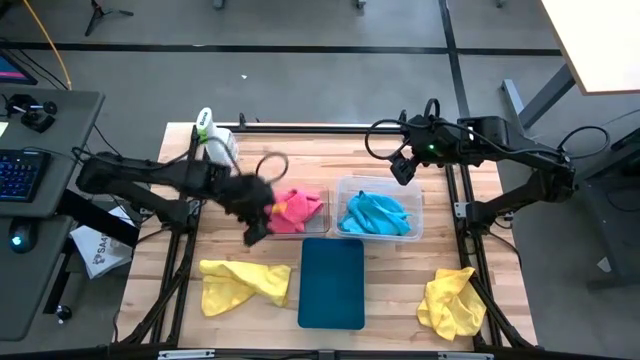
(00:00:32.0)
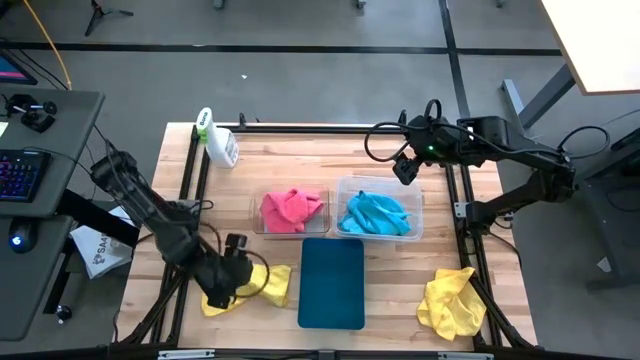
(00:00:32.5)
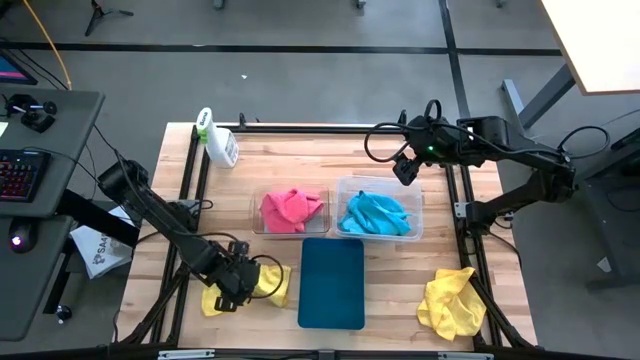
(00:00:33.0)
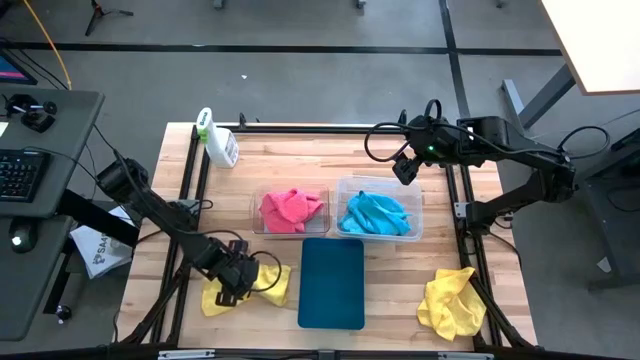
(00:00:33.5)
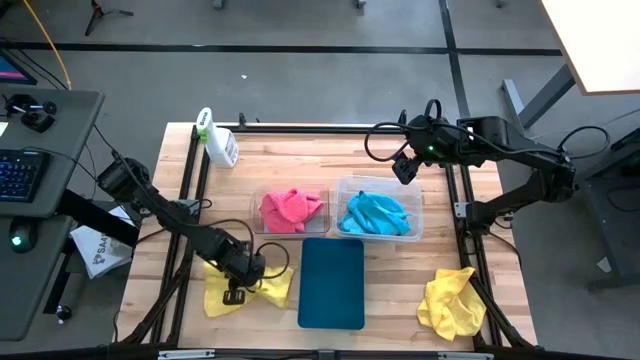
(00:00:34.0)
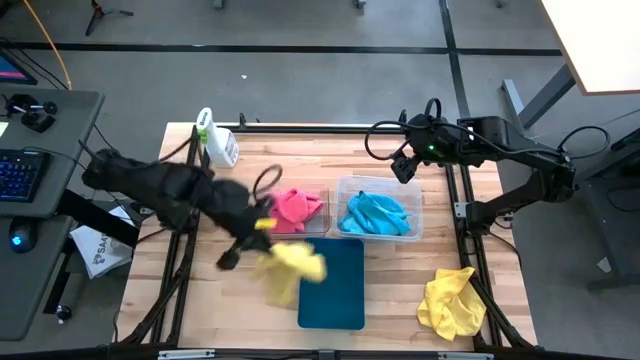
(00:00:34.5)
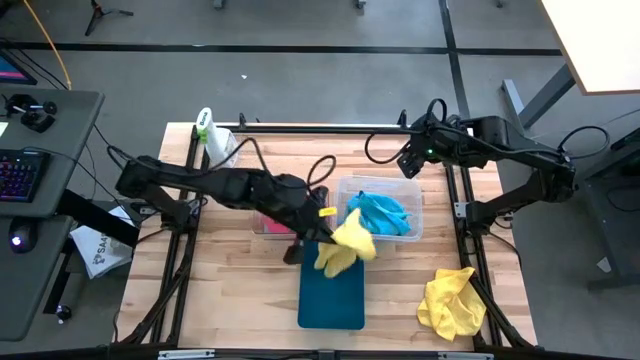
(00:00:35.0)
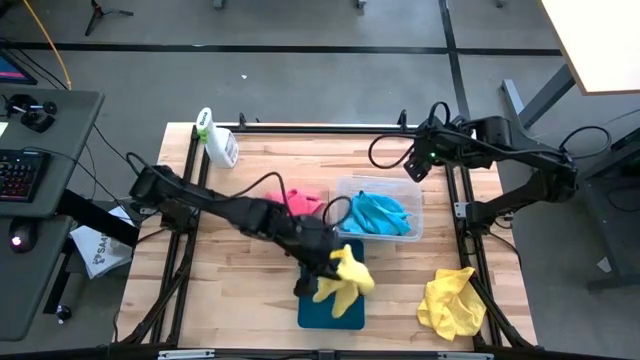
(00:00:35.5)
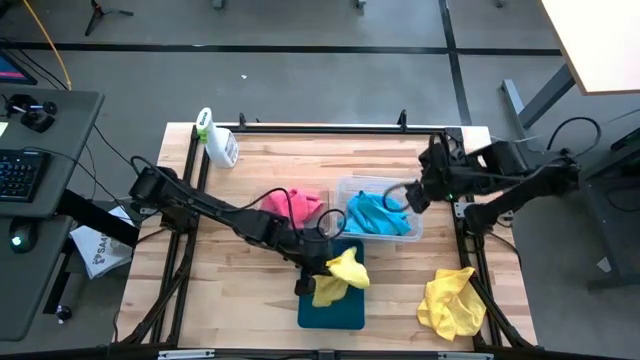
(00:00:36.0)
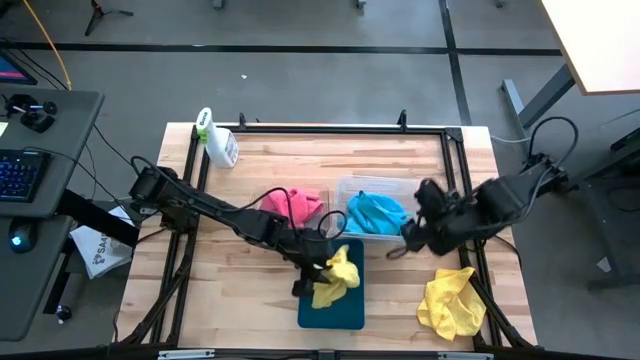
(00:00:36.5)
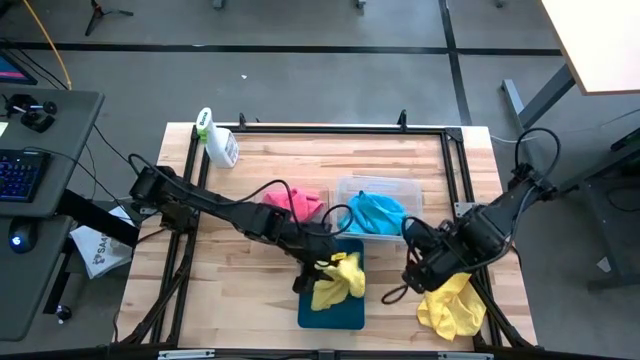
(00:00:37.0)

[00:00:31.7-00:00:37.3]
Task: Sort microfiber towel by color & place in baskets
Put the left yellow microfiber towel into the blue bin

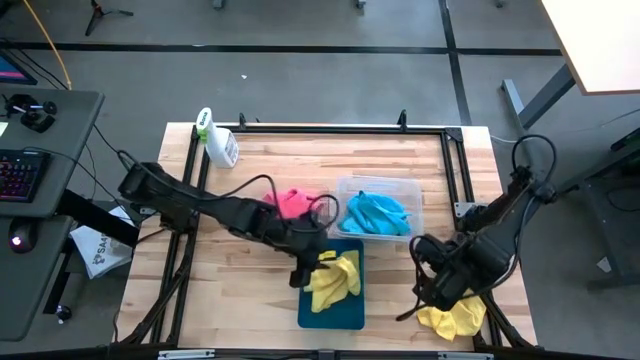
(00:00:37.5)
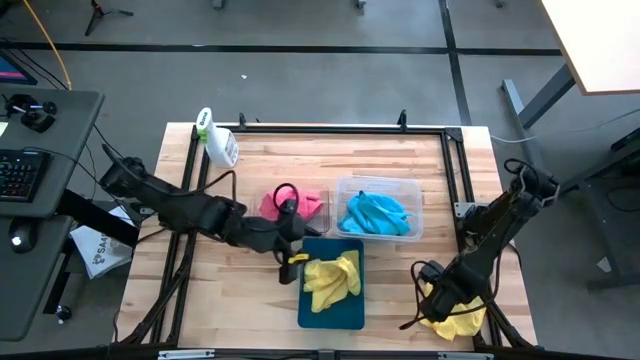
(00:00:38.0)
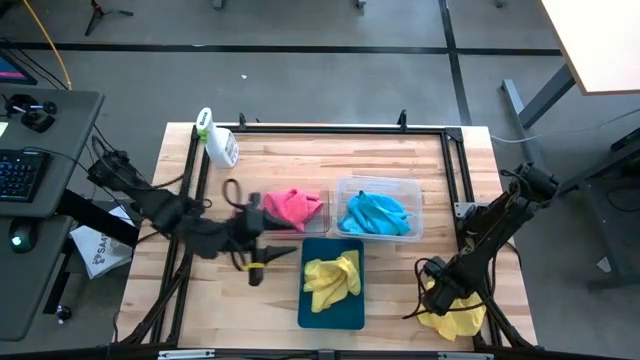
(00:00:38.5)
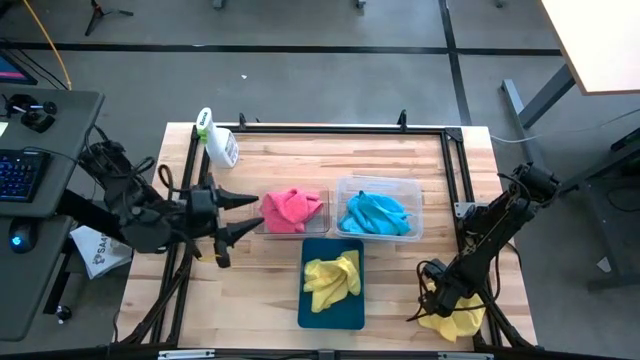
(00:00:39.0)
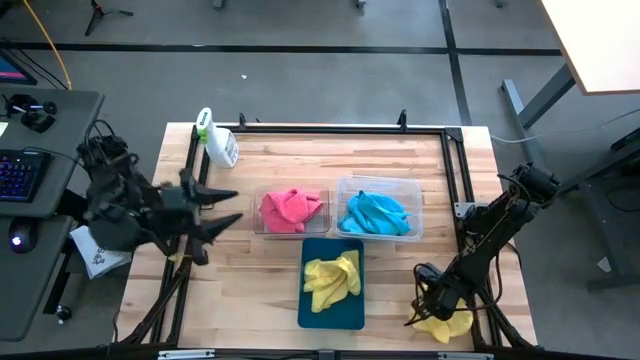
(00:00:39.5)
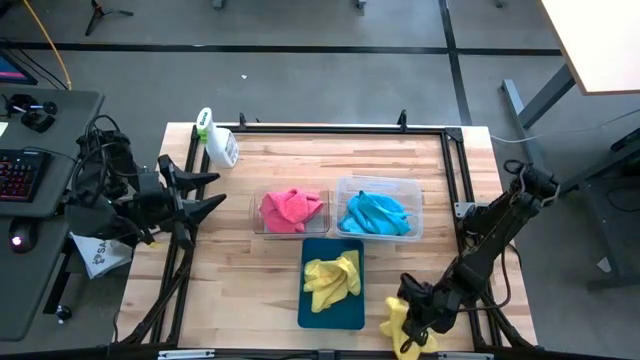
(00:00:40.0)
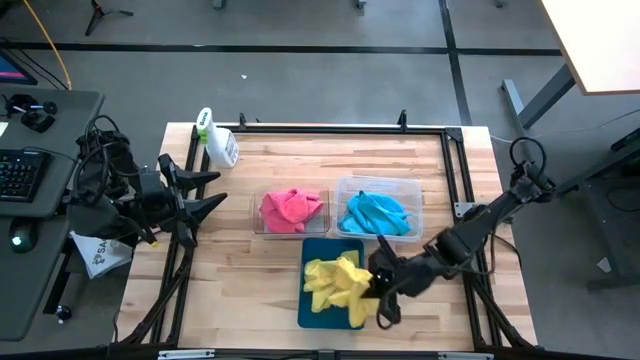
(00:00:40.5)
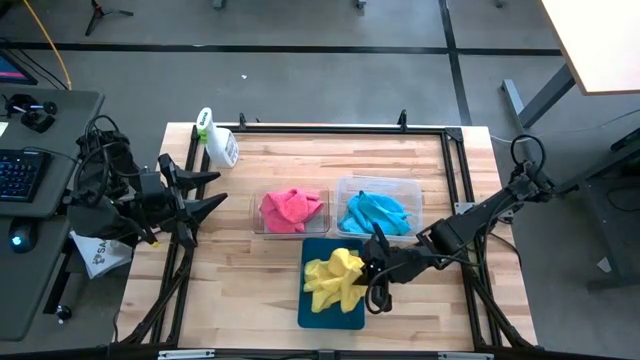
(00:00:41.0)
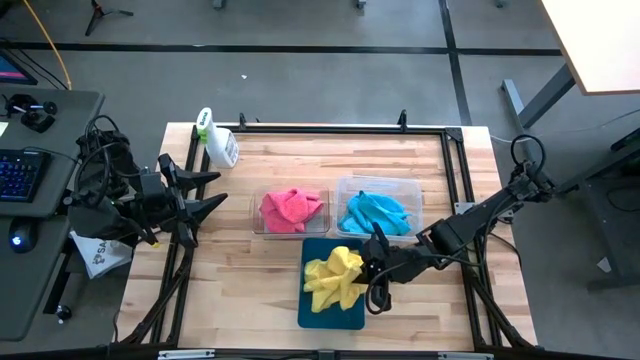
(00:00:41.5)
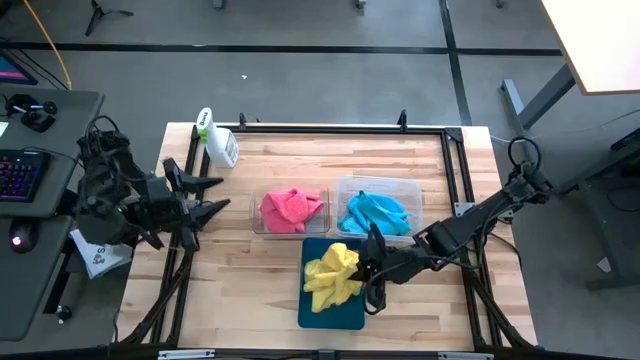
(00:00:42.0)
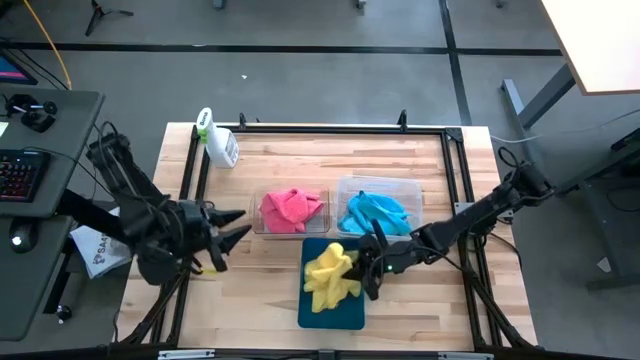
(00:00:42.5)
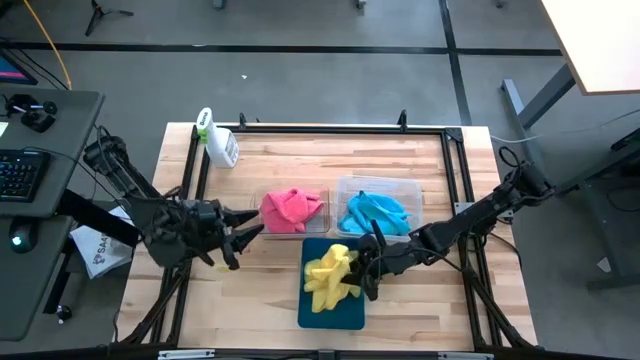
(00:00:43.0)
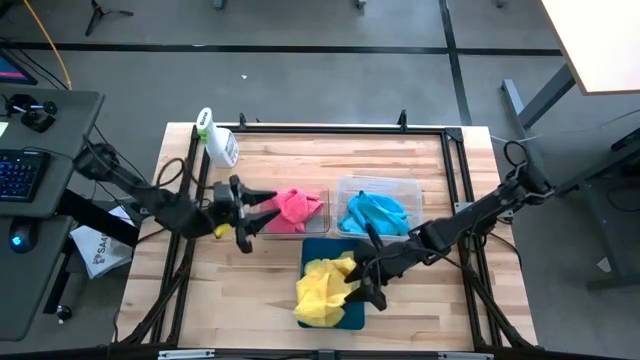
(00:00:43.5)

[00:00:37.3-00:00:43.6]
Put the yellow microfiber towel into the blue bin

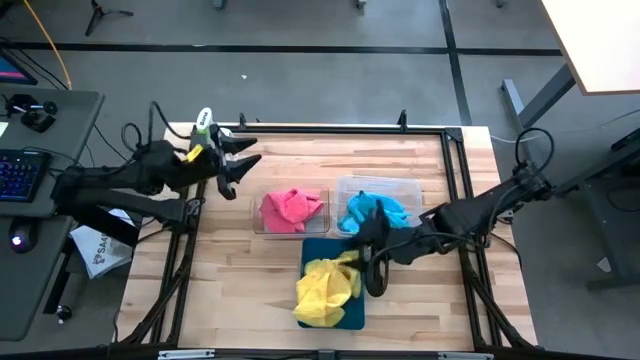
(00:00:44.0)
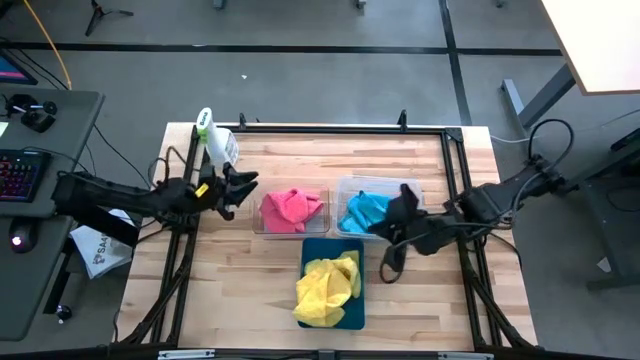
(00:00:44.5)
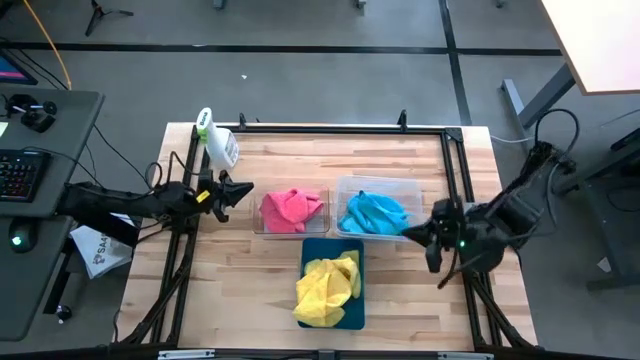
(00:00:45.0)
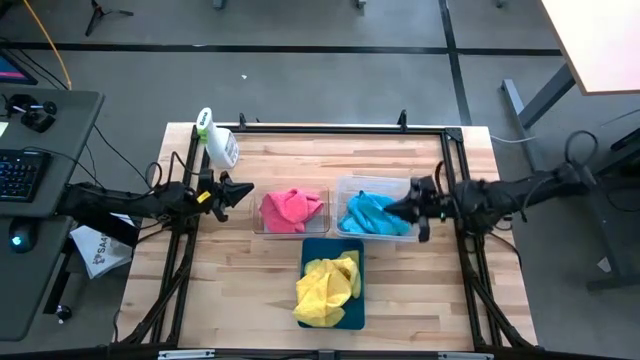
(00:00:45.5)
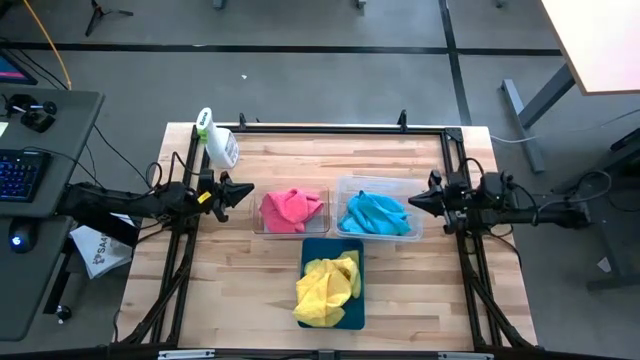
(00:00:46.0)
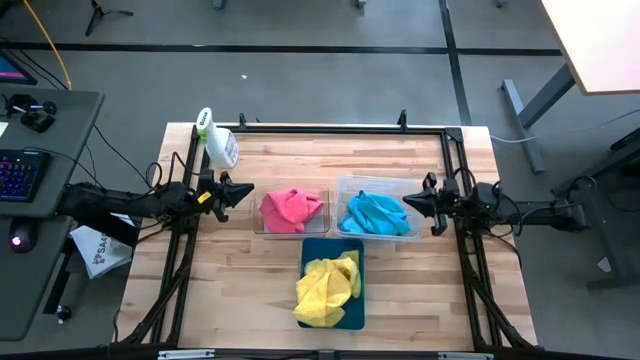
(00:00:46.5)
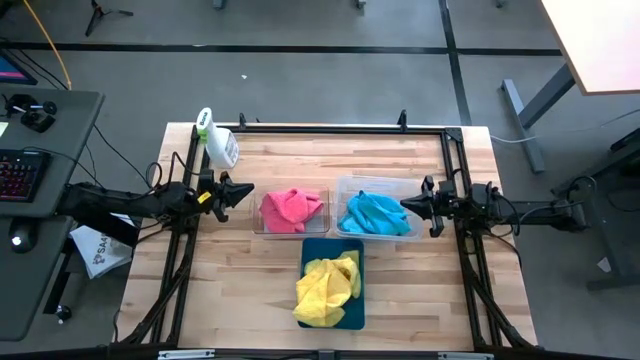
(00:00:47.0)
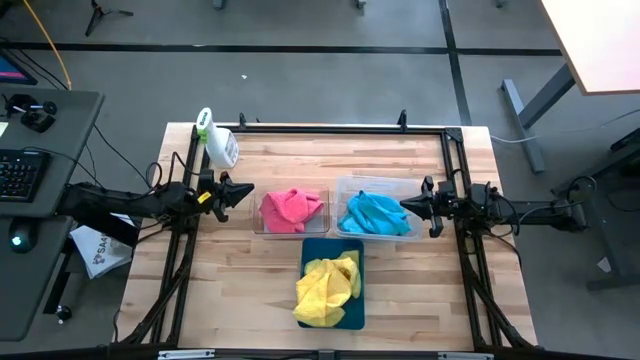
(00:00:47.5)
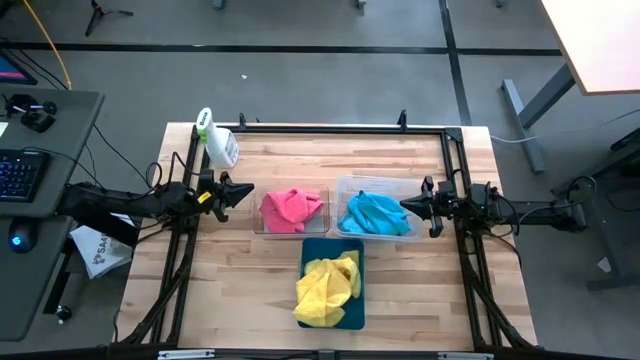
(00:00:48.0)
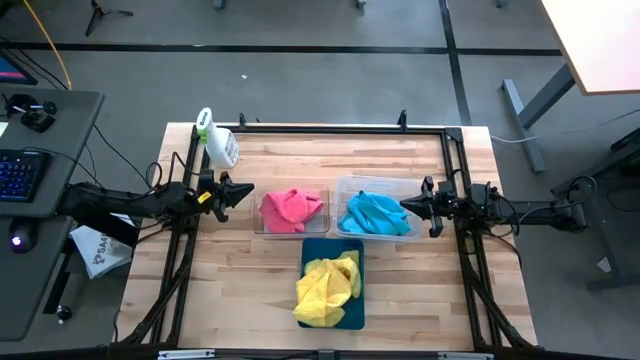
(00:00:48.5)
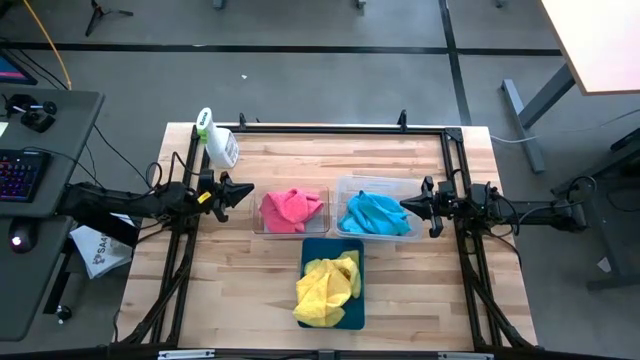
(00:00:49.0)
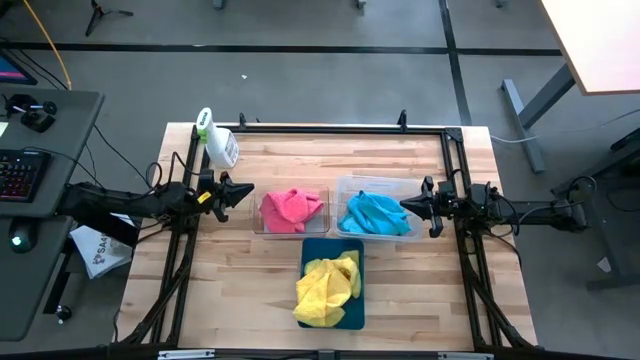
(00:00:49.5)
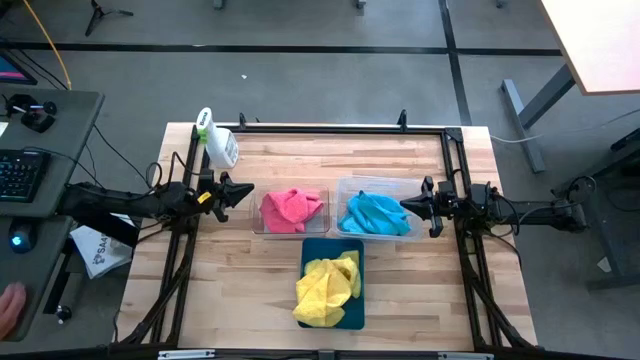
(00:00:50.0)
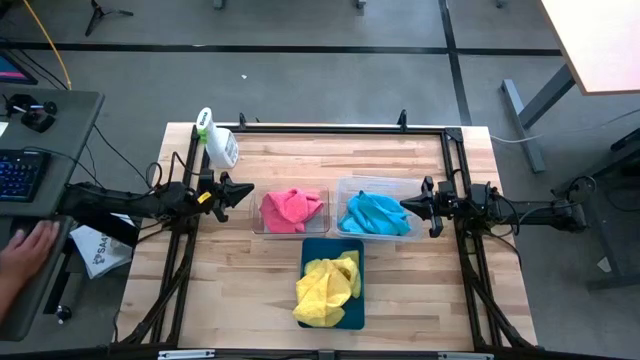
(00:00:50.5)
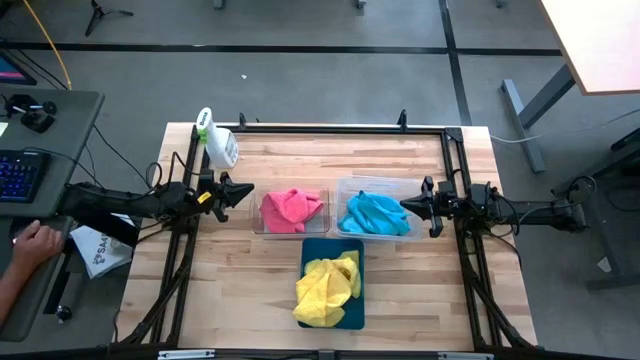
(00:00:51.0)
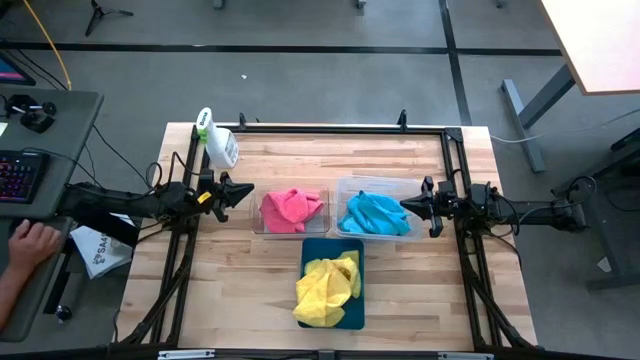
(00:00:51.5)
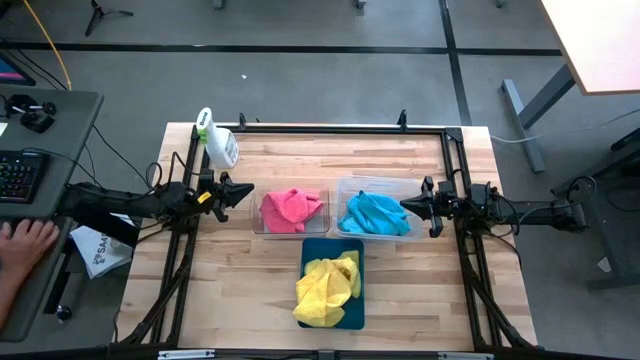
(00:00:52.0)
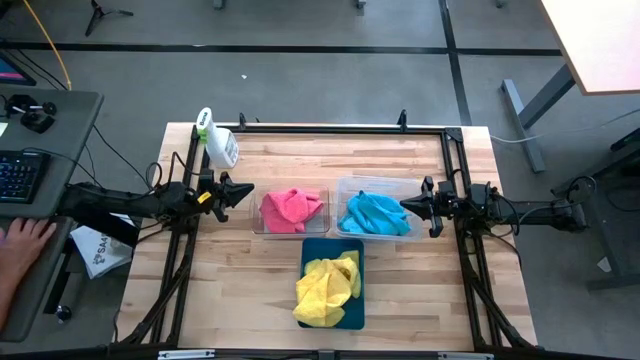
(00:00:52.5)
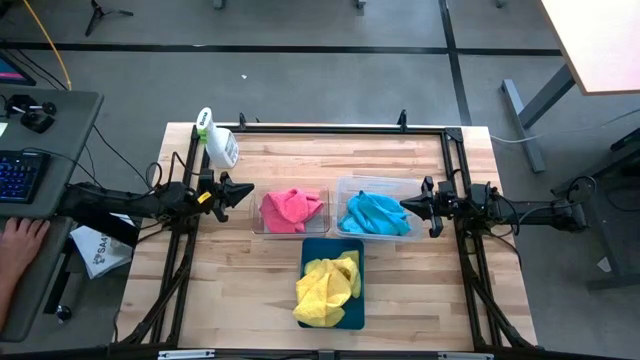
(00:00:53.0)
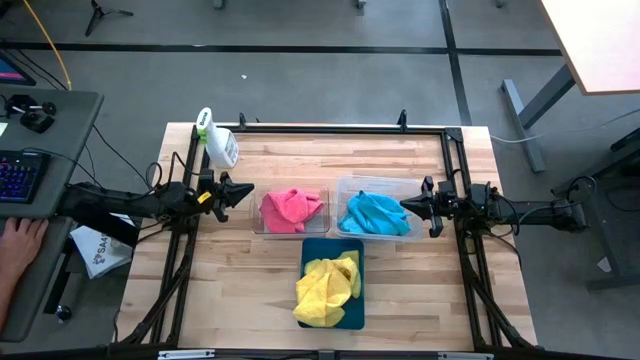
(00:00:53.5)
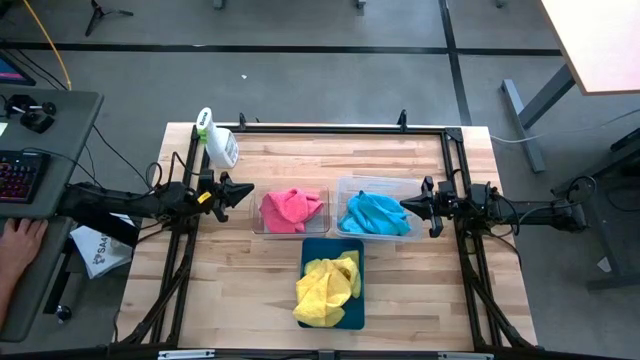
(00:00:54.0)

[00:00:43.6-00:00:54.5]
Return to Home Position
